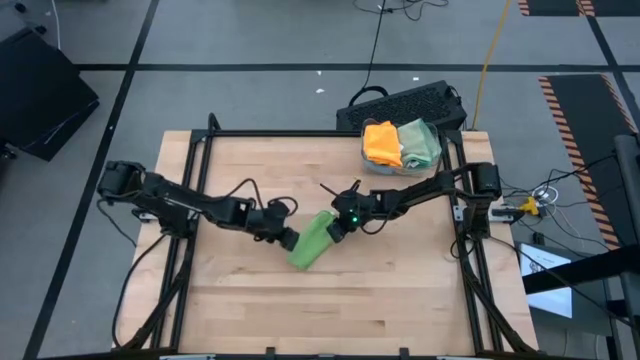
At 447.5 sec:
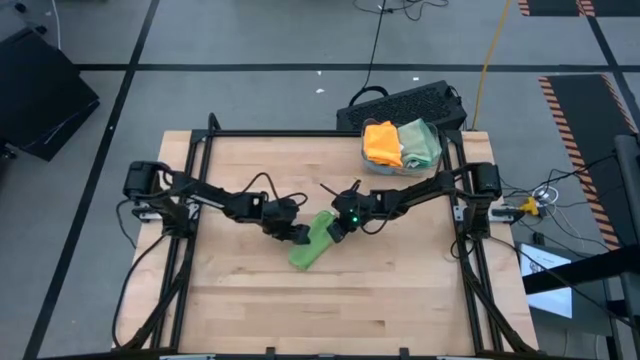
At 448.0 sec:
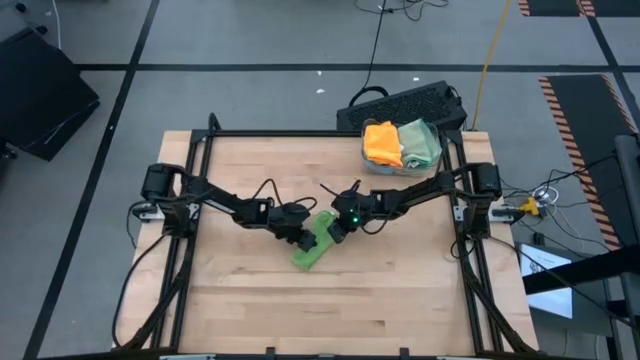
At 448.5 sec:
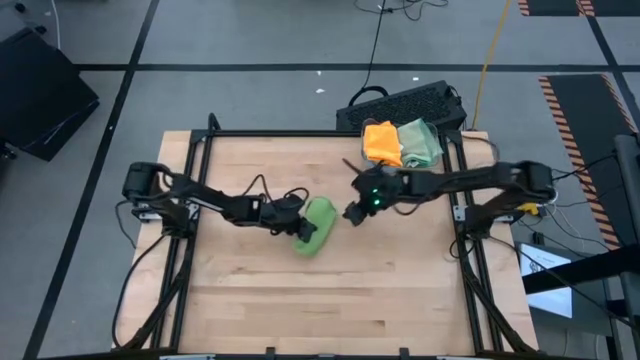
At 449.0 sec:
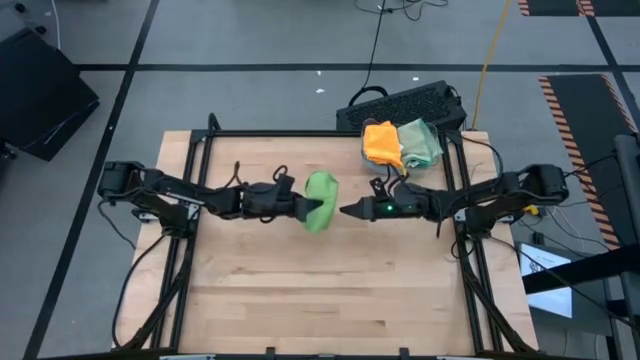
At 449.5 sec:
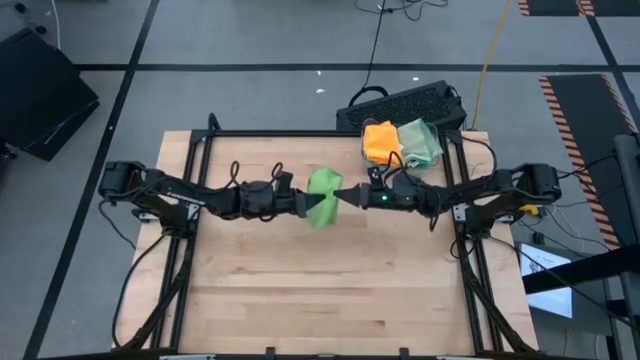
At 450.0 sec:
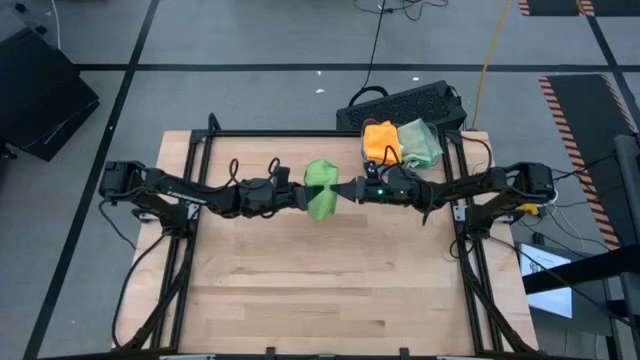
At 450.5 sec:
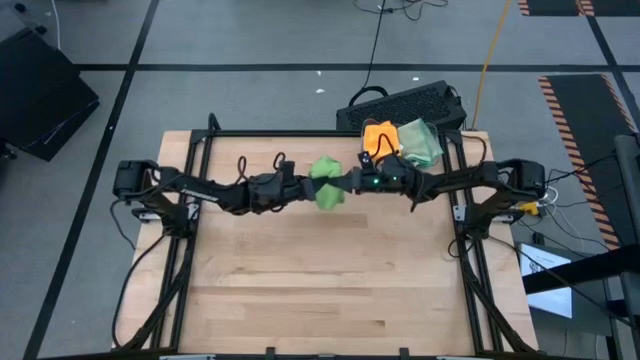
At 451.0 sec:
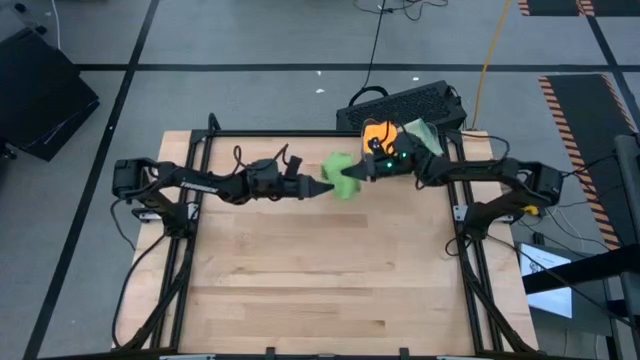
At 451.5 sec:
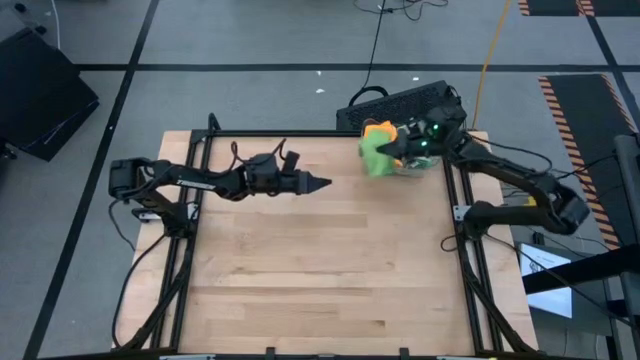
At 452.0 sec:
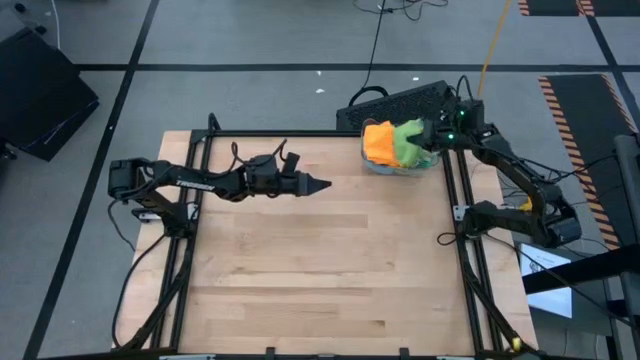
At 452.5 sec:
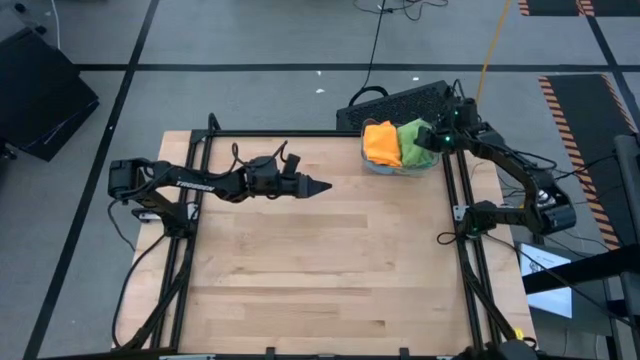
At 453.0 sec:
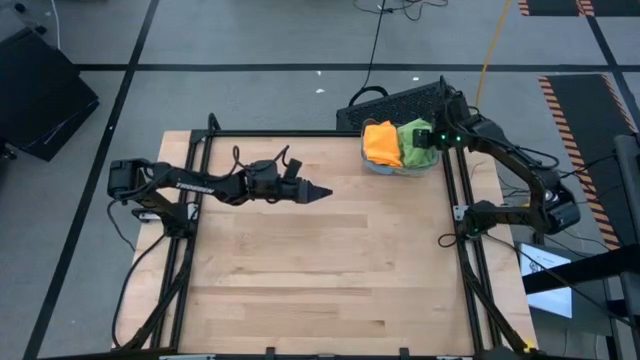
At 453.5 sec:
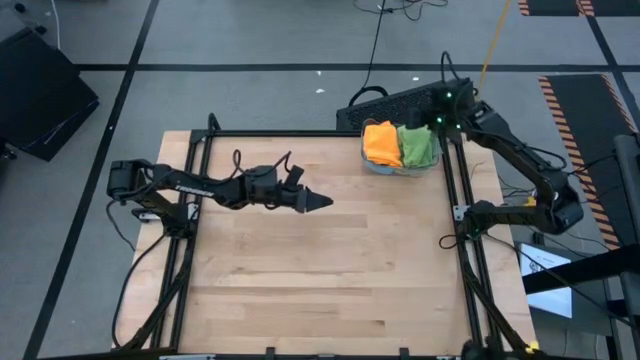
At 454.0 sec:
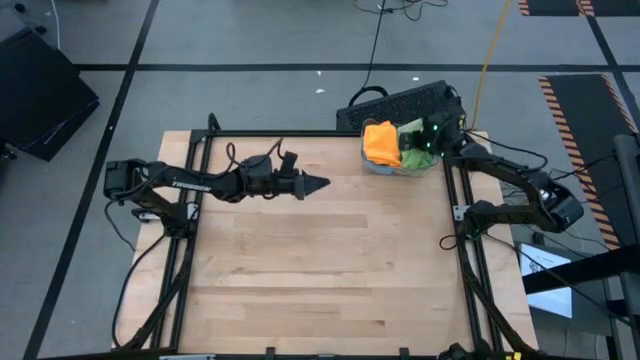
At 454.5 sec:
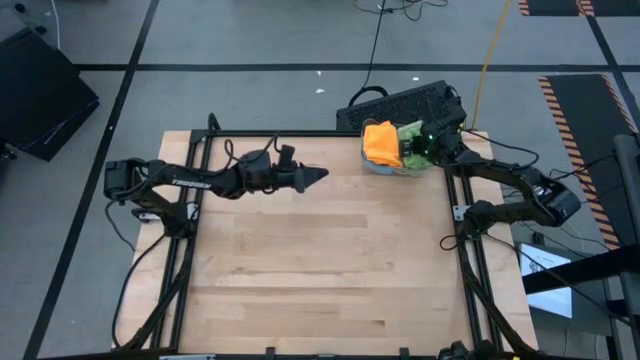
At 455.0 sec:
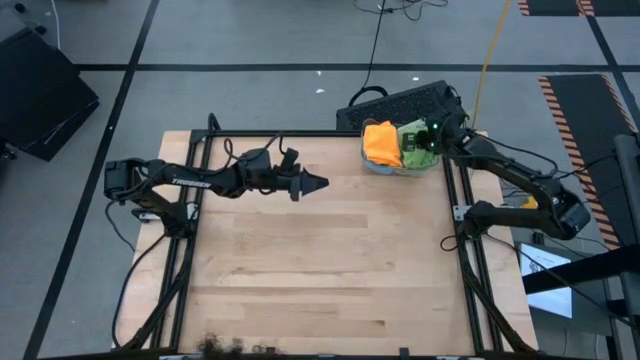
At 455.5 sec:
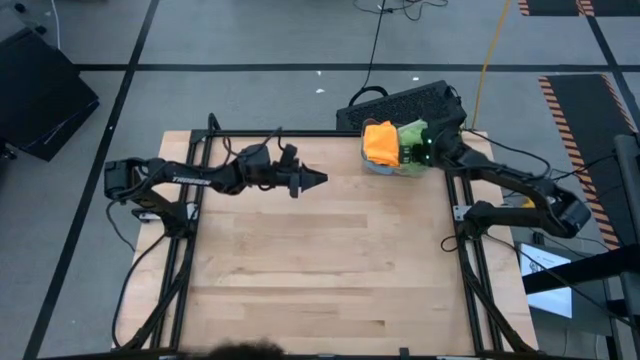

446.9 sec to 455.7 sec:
Task: Fold microfiber towels
Put the green microfiber towel into the transparent bin

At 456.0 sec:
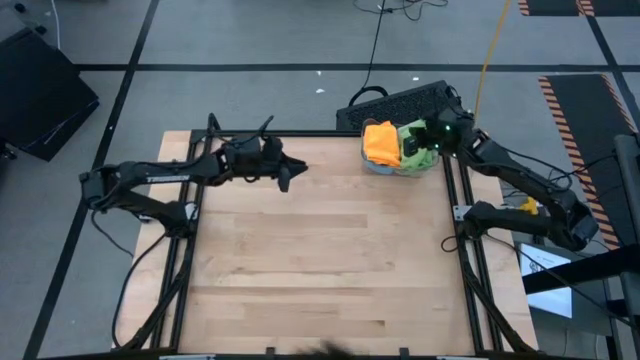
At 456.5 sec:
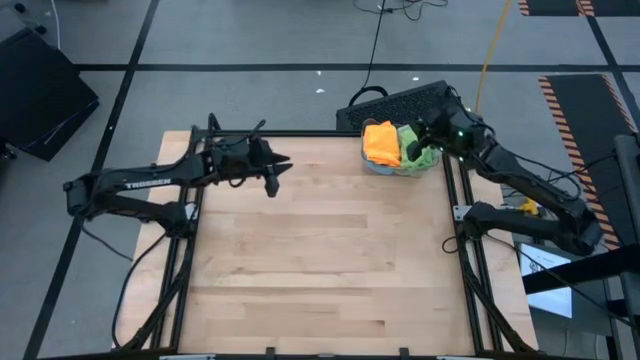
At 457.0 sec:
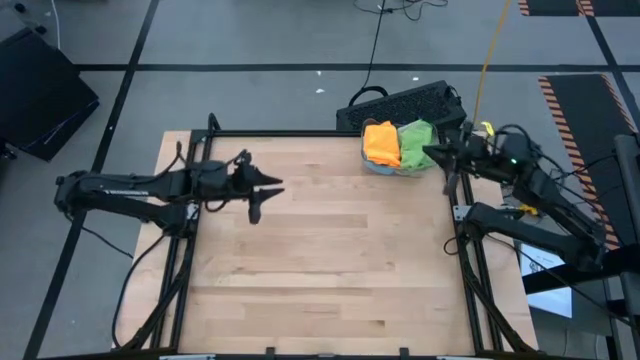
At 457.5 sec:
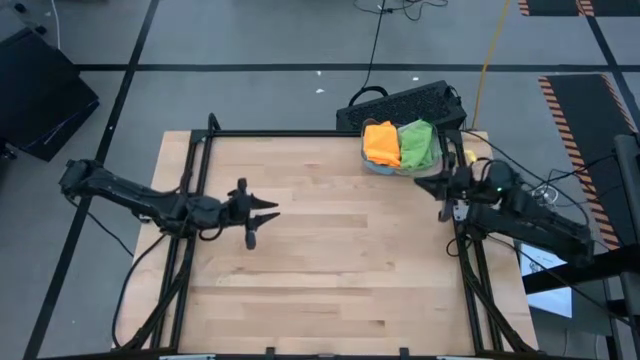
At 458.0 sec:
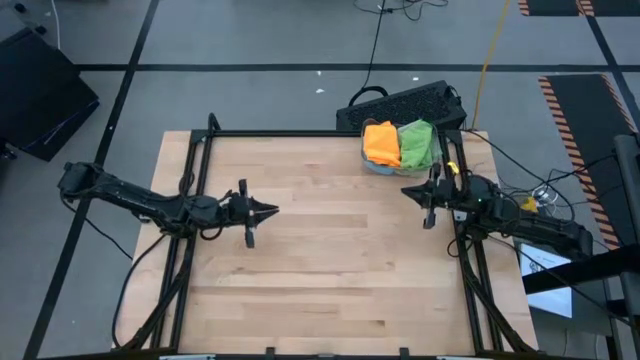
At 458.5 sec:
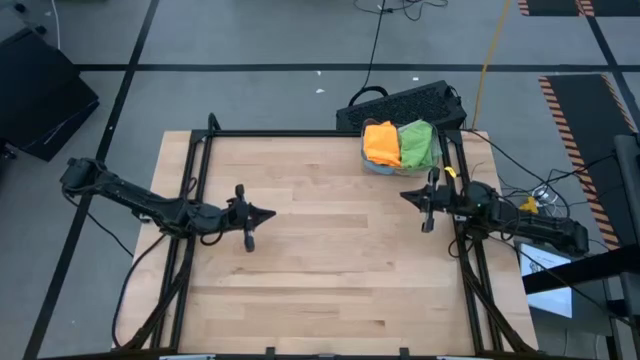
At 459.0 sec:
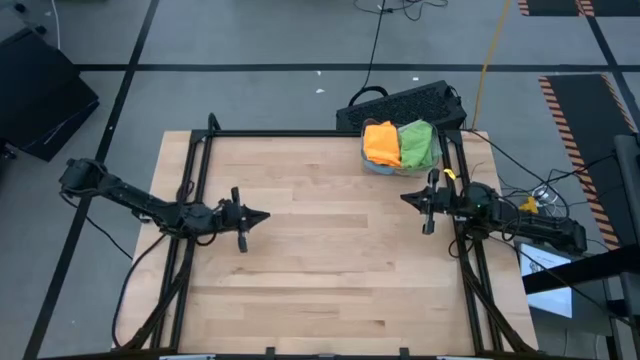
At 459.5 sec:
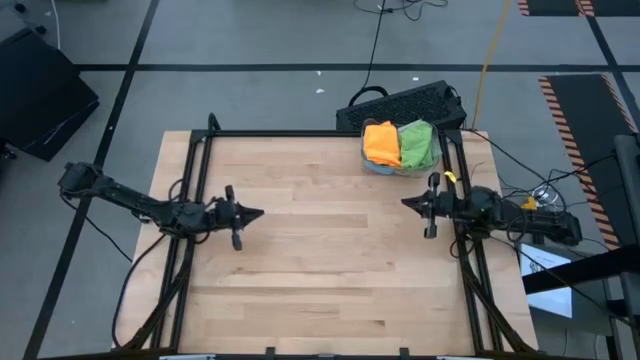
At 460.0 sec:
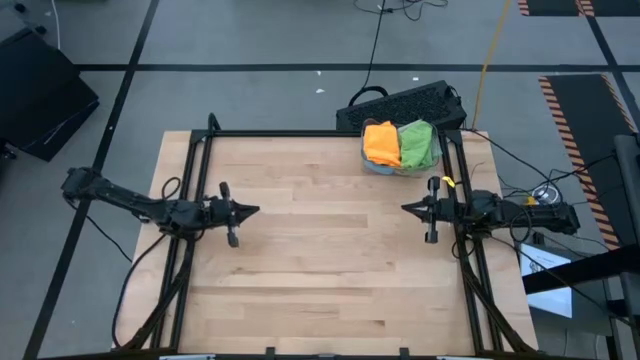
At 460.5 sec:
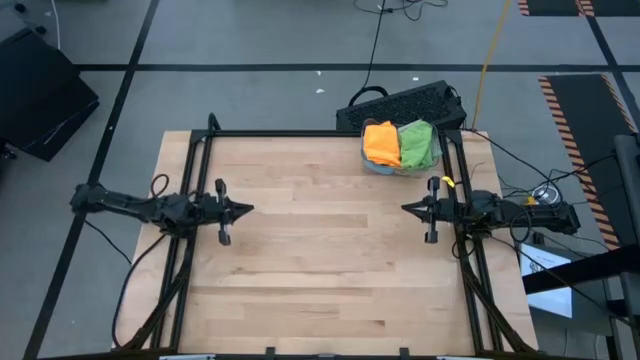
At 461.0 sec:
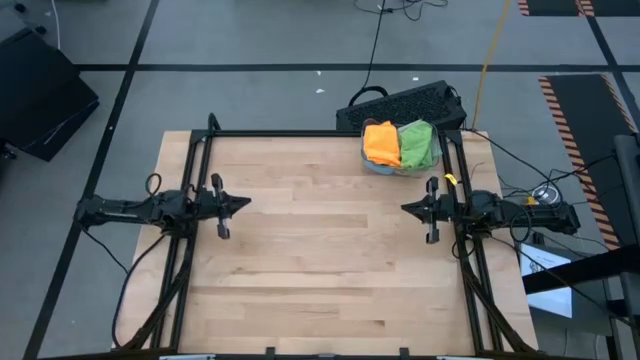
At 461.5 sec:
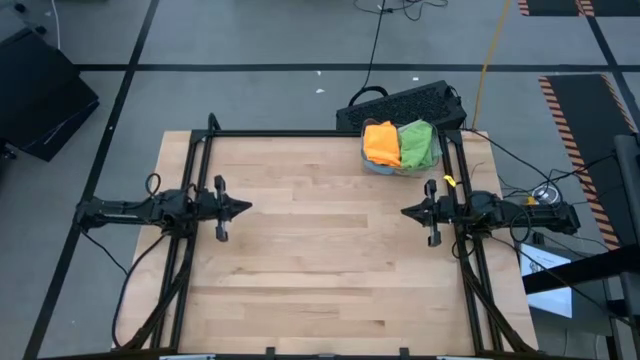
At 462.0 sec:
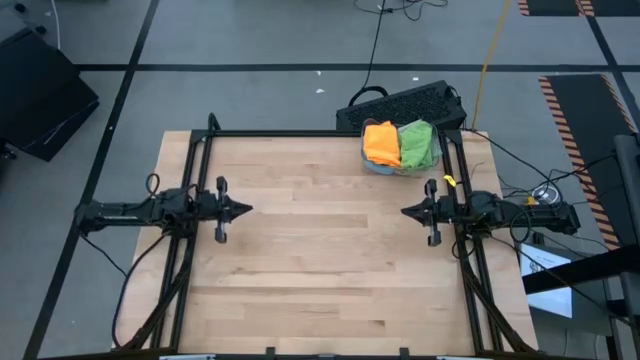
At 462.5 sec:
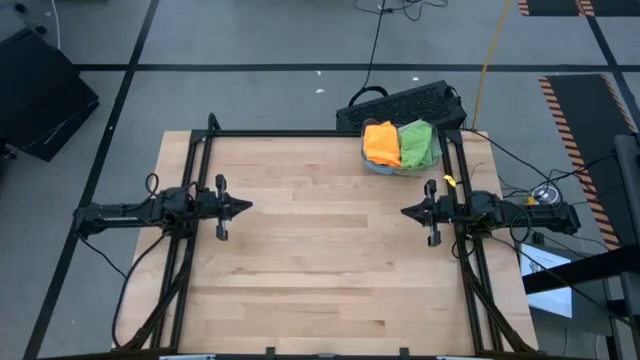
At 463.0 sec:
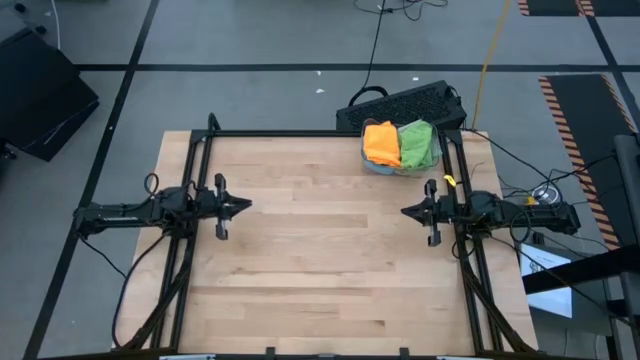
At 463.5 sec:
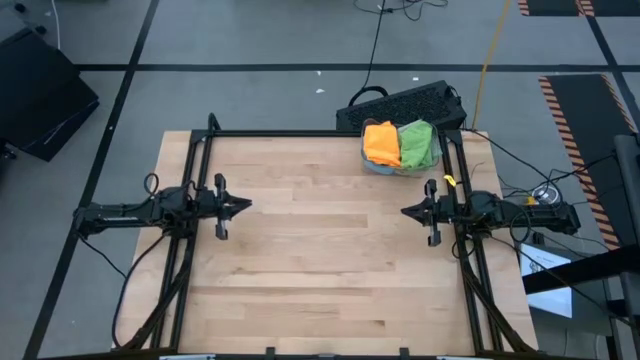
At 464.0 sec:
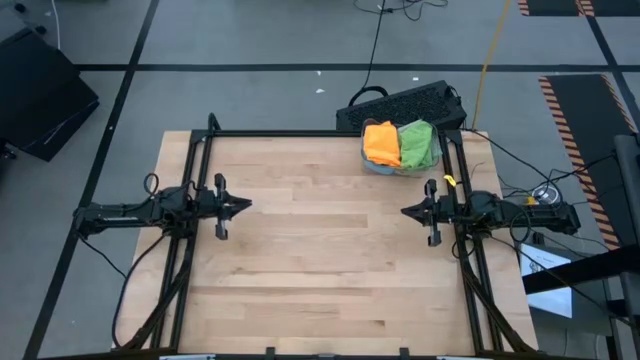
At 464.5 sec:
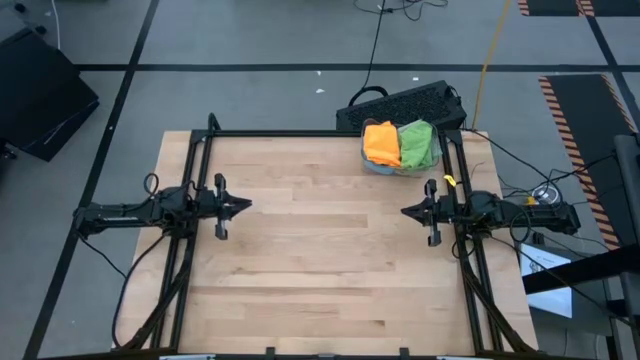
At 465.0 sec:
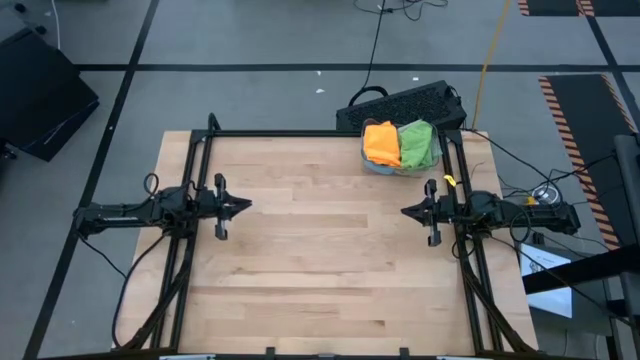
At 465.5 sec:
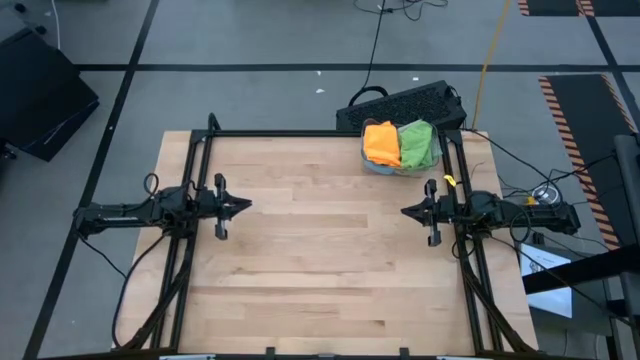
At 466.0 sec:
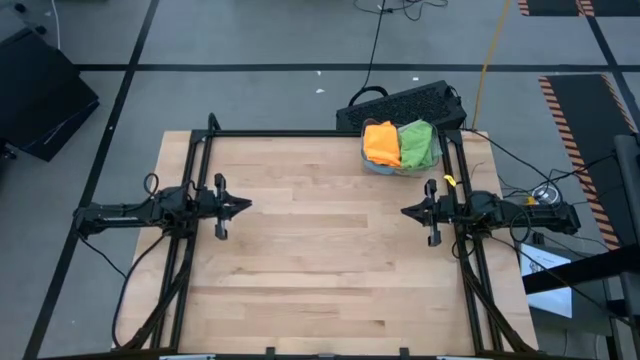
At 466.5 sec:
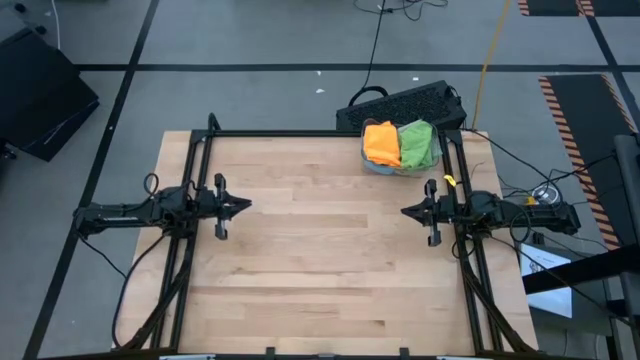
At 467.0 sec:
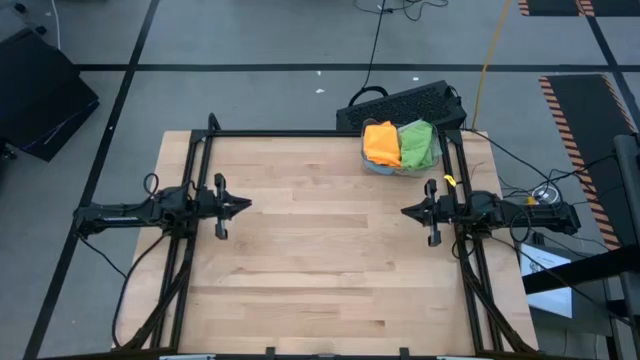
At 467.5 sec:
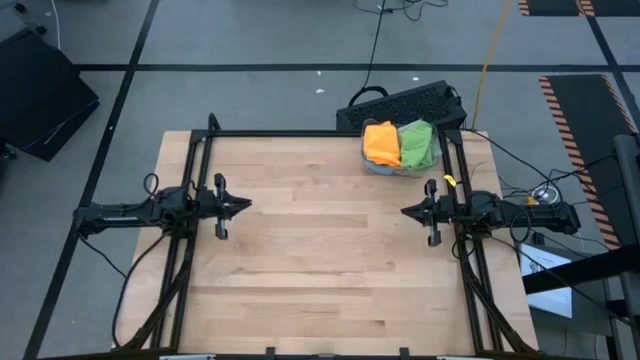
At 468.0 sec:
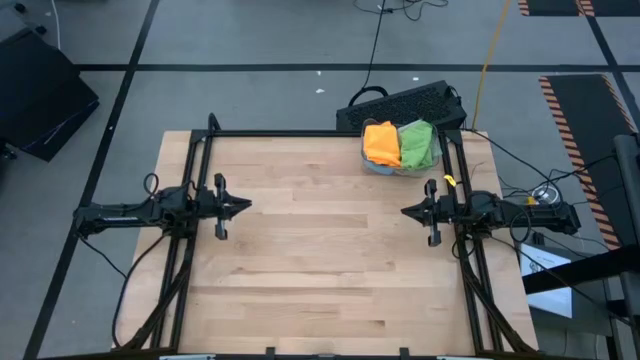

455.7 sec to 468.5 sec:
Return to Home Position
